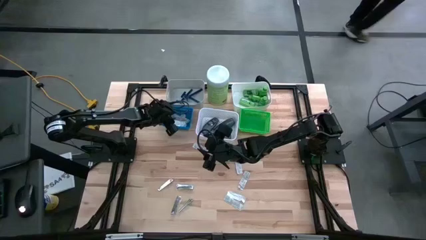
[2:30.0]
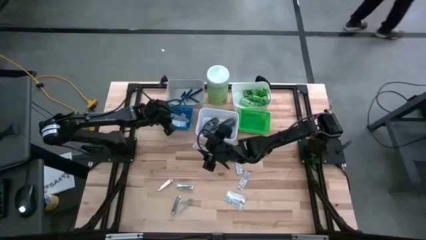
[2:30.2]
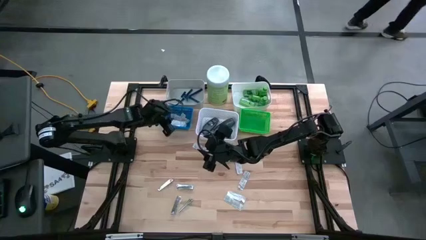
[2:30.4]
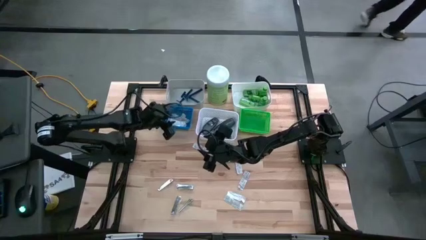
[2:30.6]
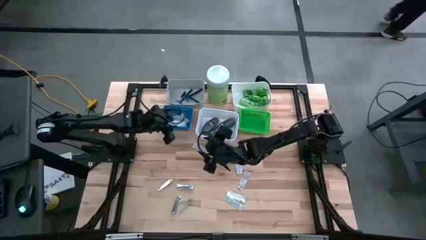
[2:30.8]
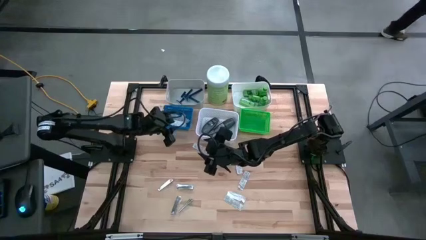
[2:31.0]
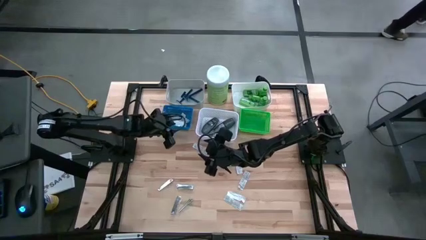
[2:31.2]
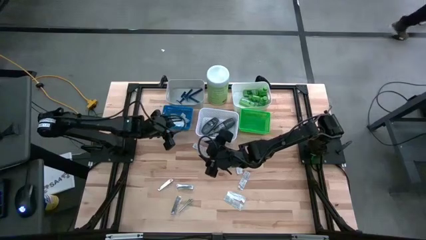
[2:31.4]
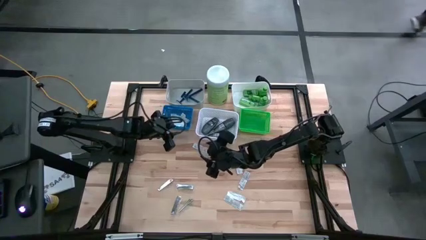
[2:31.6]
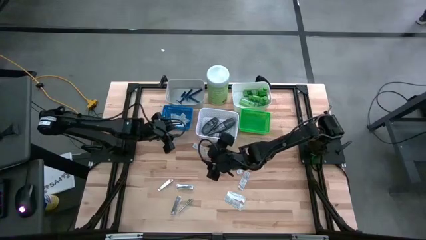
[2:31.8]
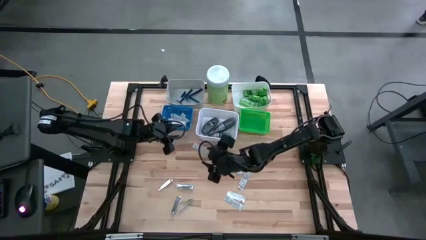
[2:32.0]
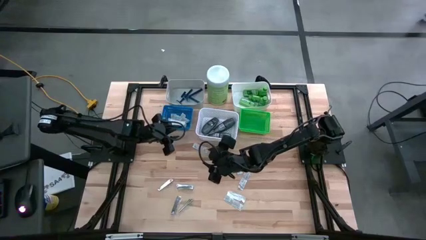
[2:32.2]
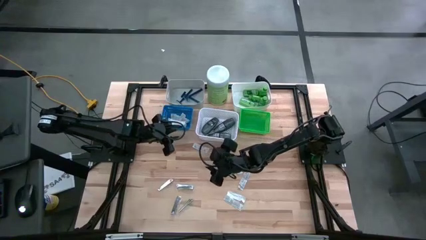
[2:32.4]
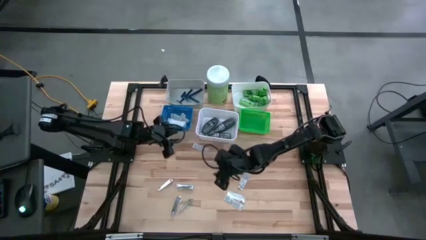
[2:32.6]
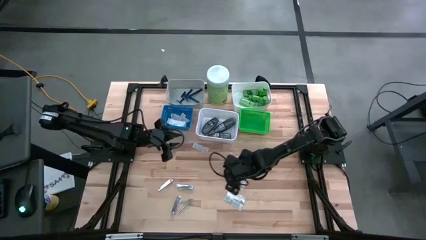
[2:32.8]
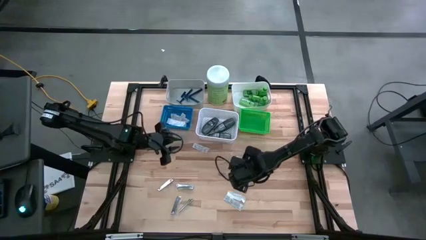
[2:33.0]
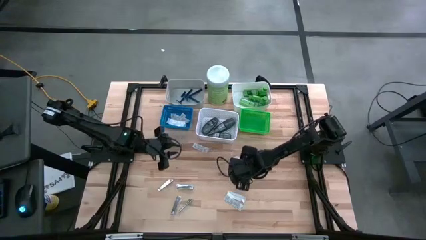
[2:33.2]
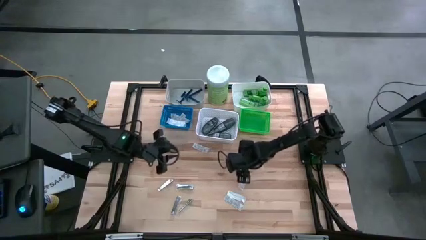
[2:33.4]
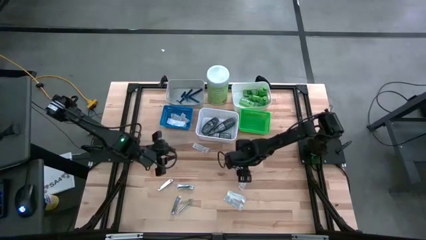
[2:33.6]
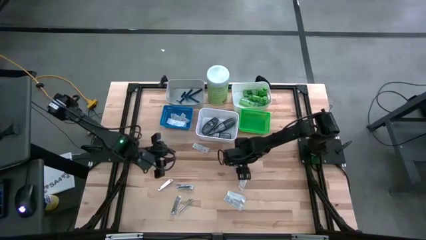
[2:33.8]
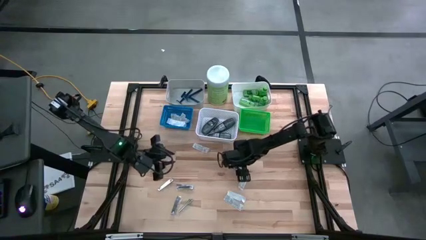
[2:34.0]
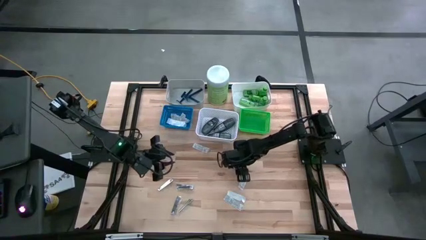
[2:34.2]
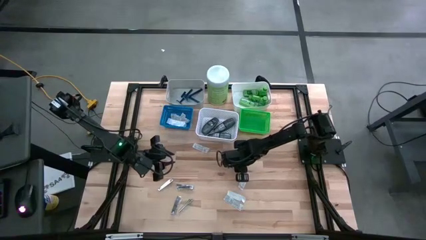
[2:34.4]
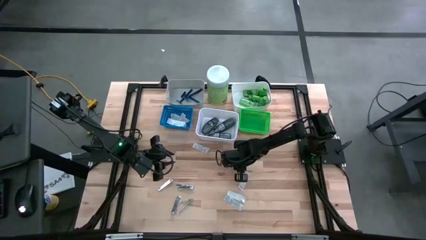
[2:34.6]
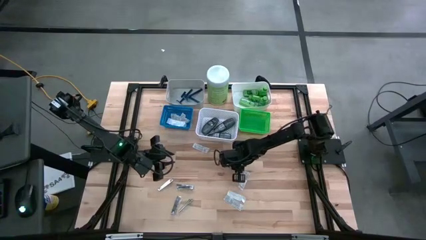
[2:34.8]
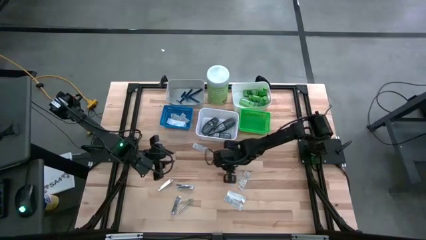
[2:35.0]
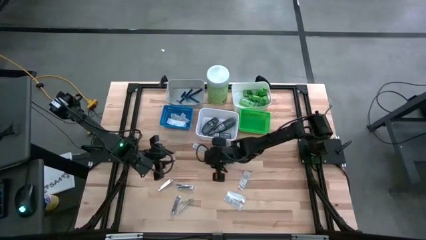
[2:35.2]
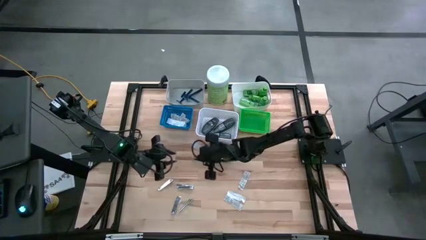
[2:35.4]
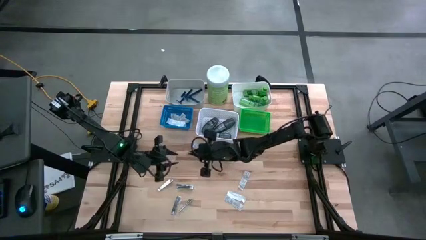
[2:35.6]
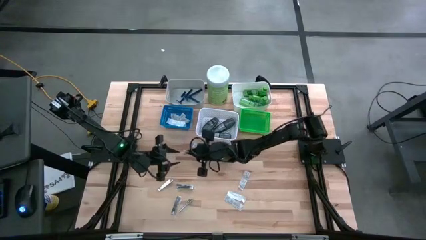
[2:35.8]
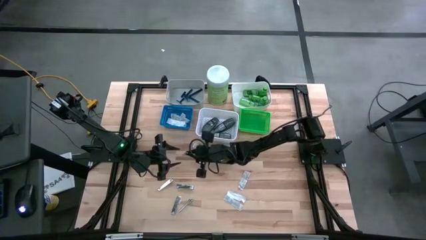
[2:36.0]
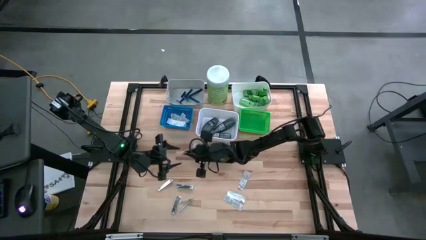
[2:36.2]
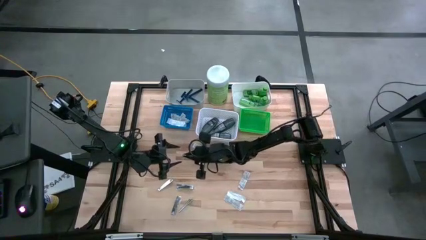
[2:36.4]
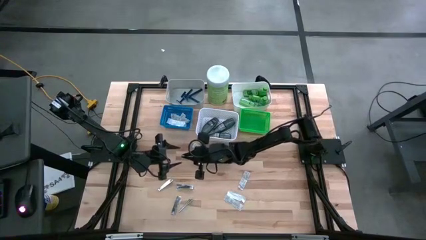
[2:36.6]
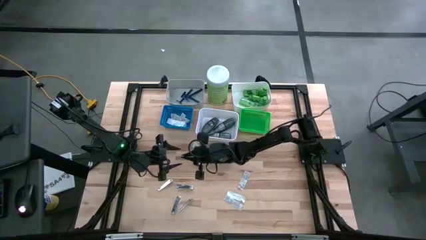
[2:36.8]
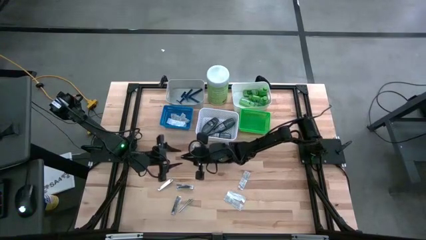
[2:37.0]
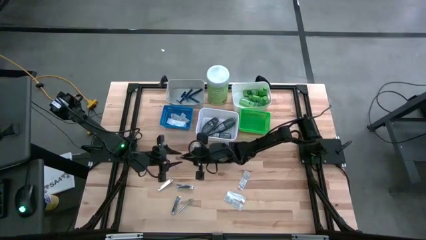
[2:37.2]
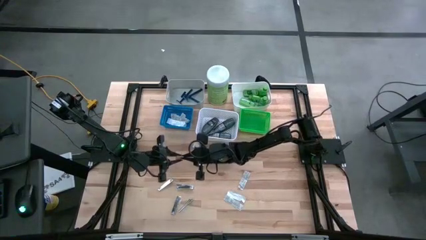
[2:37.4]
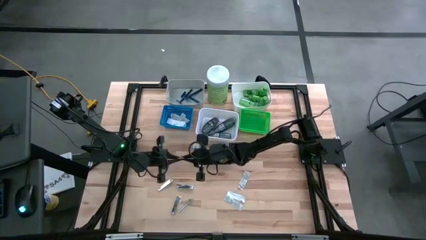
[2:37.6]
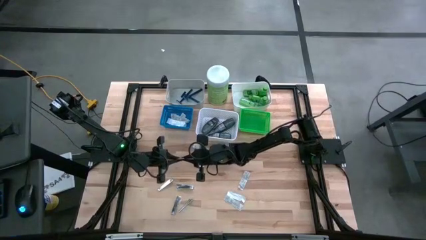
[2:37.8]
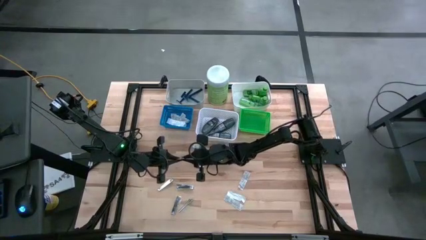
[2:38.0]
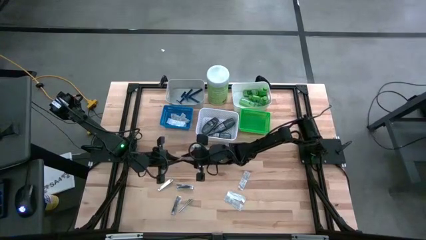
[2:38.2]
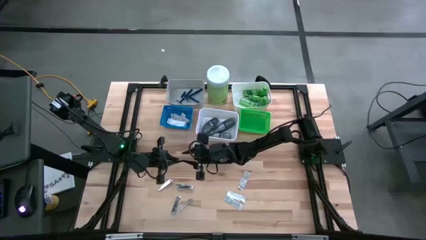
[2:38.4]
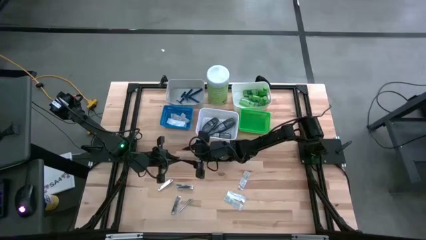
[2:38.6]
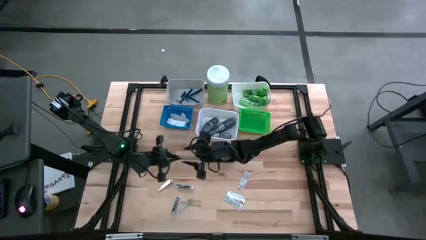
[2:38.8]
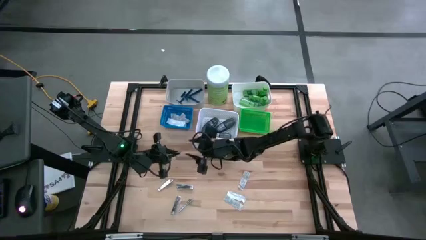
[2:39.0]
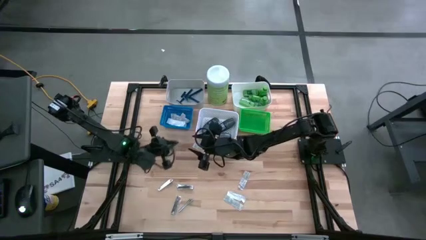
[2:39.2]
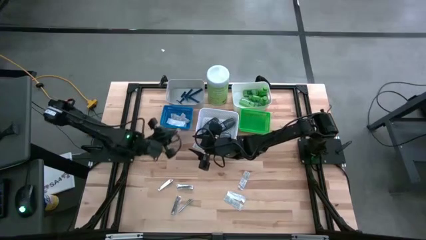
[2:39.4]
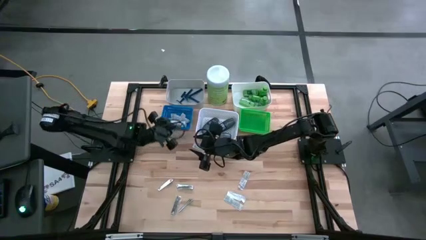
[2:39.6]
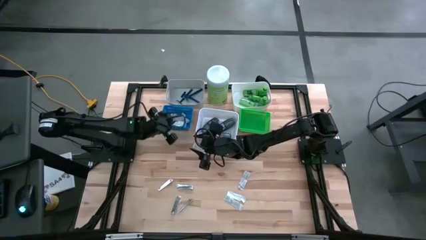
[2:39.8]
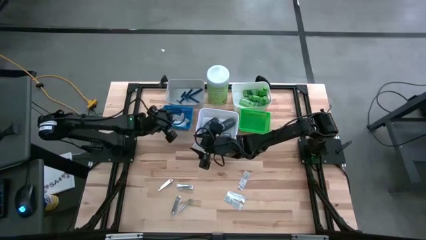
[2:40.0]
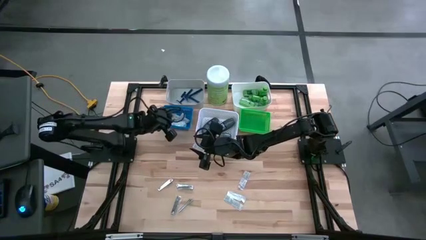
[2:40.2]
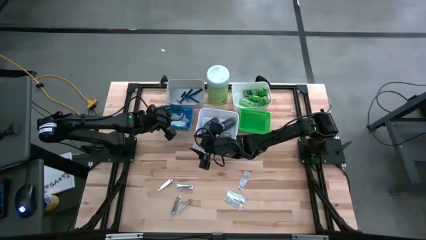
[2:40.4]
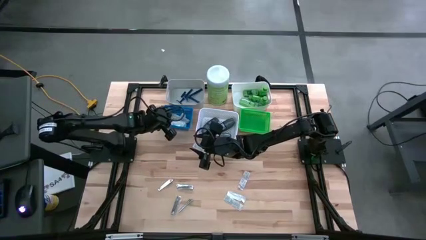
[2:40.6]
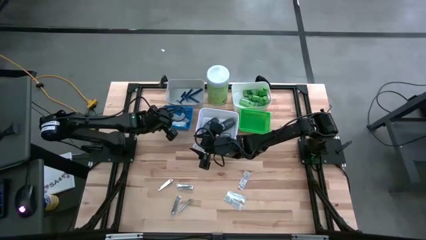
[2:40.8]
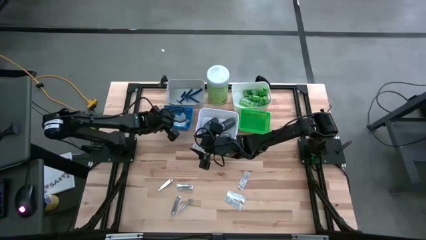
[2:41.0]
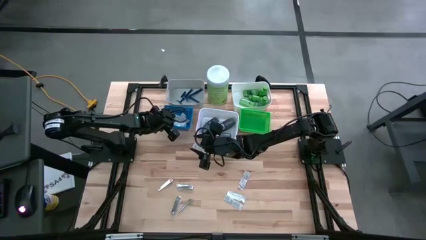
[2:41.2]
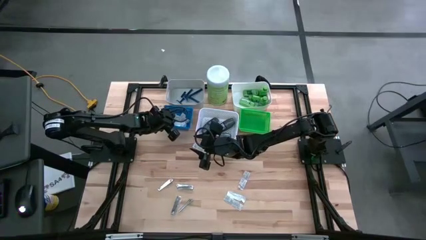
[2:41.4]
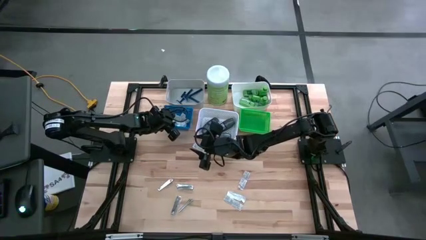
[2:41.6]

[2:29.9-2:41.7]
Task: Pick & Place Travel size toiletries
Put the white bandage into the blue bin
